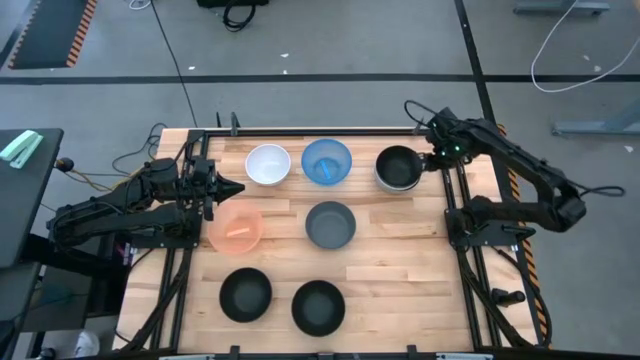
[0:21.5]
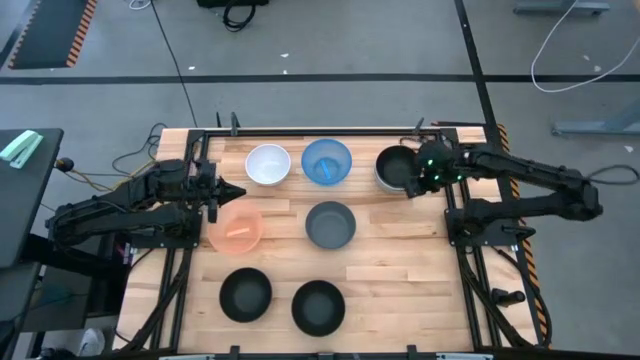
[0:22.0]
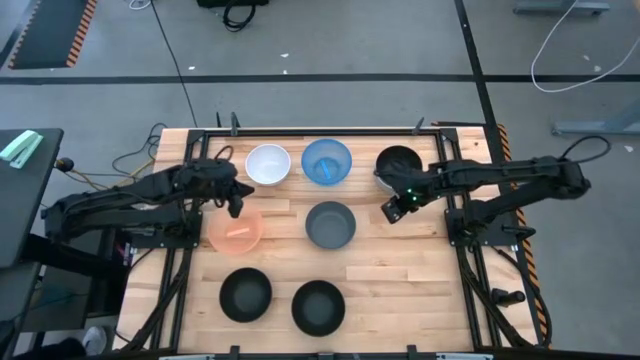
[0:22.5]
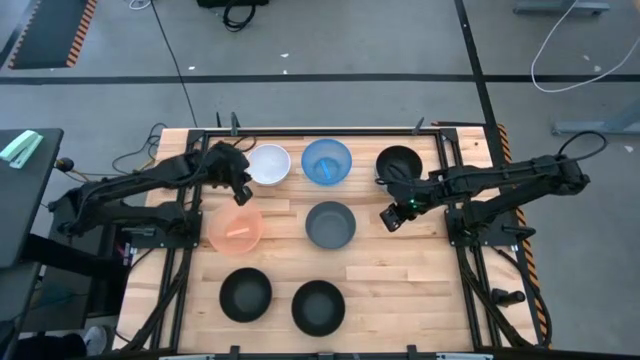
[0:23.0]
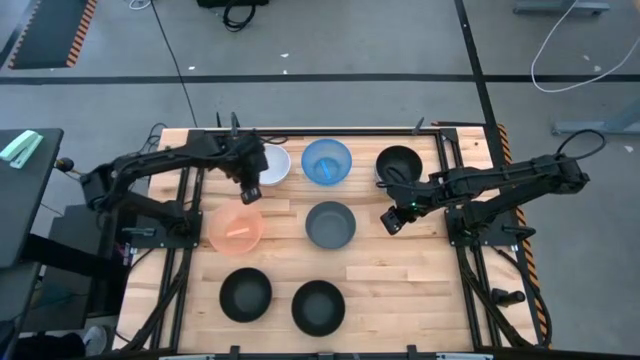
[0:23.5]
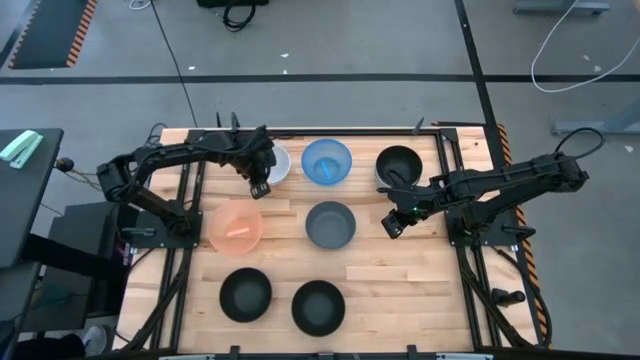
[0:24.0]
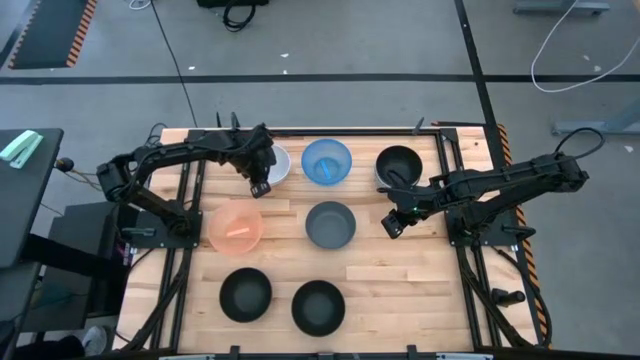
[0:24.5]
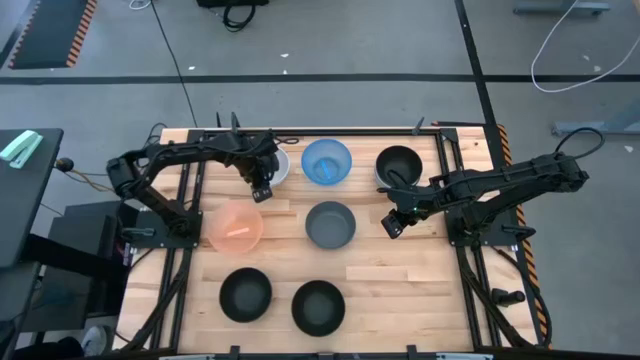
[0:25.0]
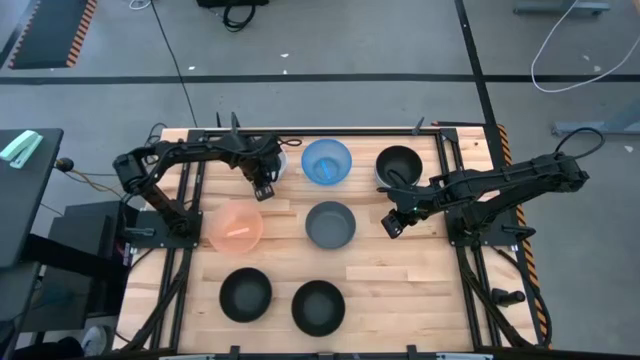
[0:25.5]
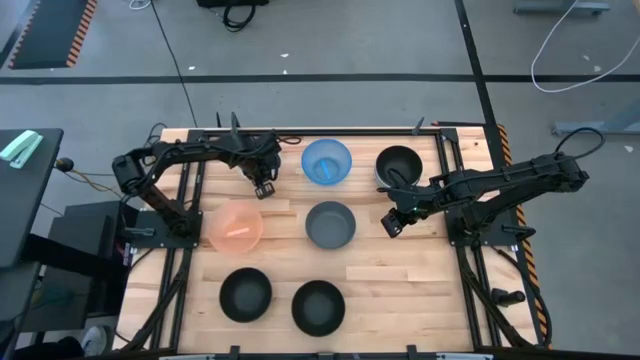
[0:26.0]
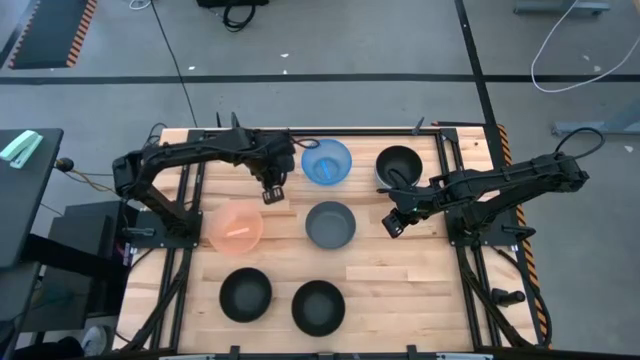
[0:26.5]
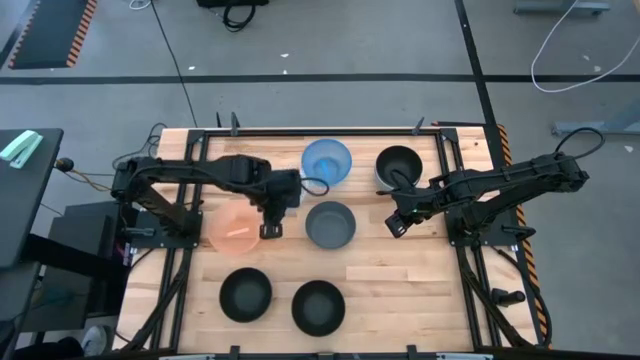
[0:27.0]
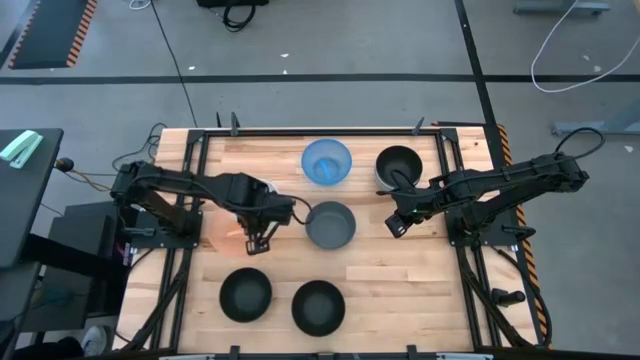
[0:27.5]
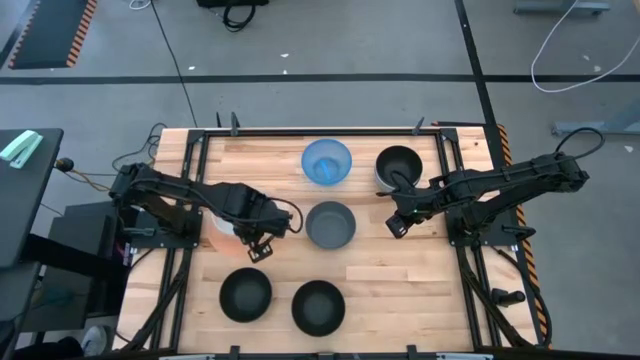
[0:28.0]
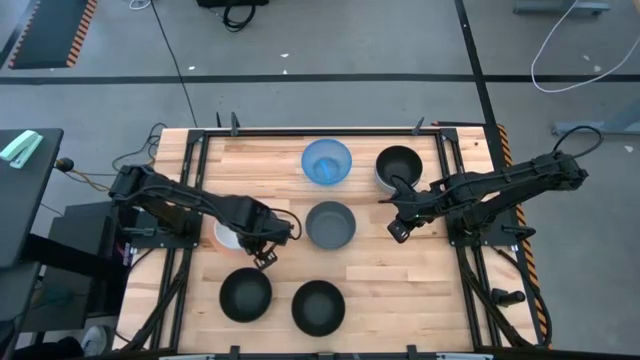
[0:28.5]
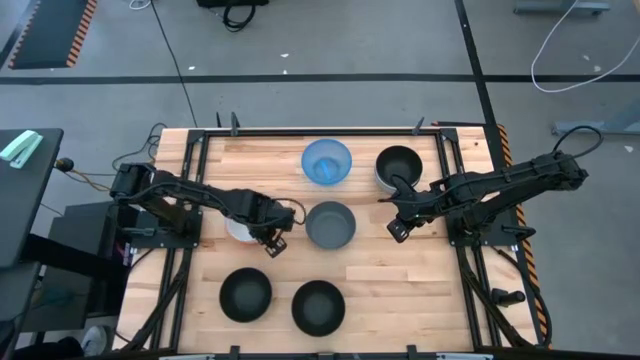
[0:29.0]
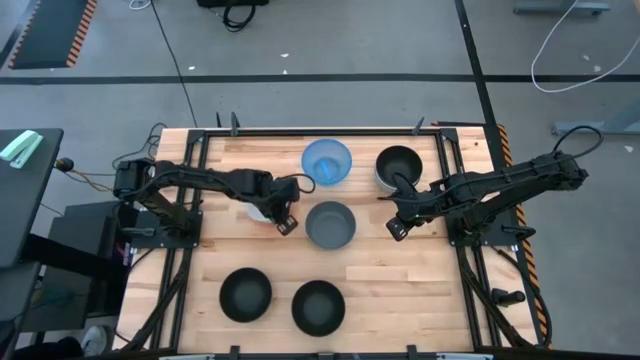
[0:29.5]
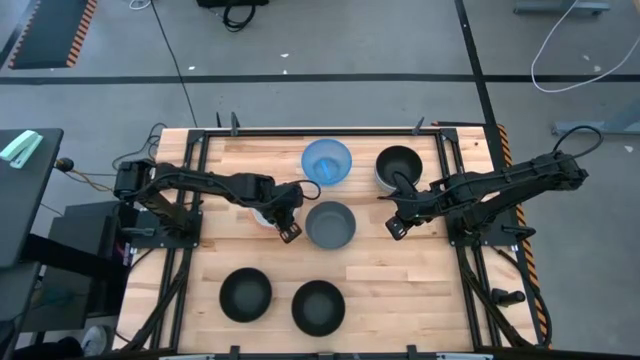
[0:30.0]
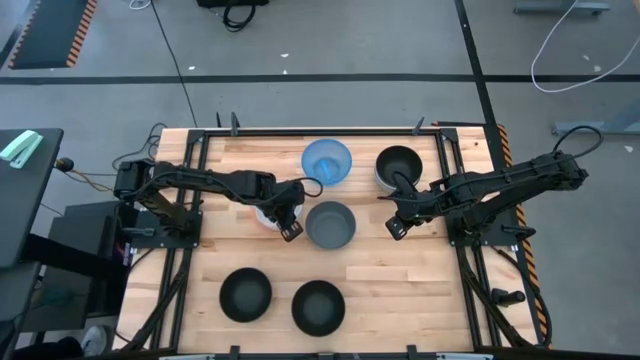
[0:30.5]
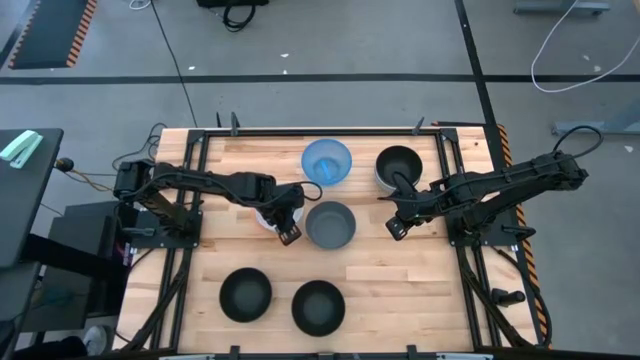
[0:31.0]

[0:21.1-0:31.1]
Task: Nest bowls inside each other
Stack the white bowl on top of the orange bowl

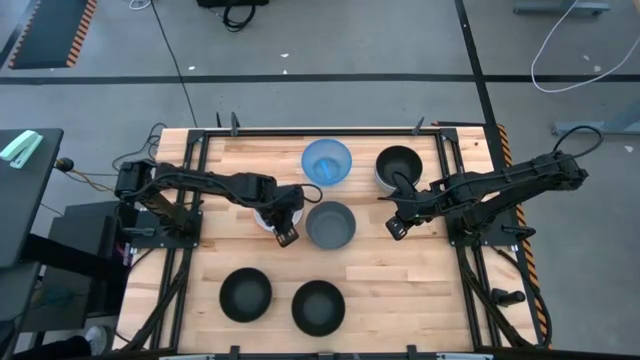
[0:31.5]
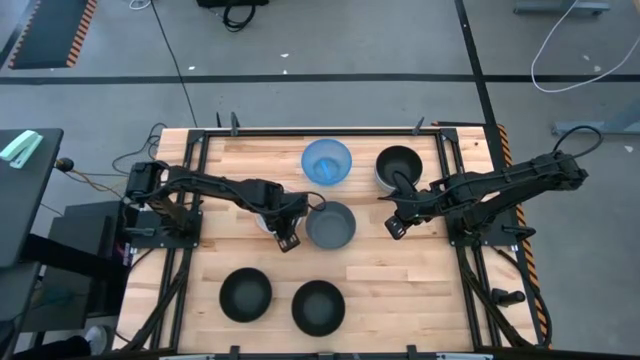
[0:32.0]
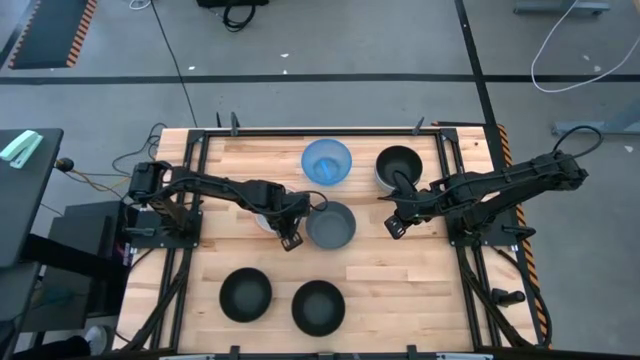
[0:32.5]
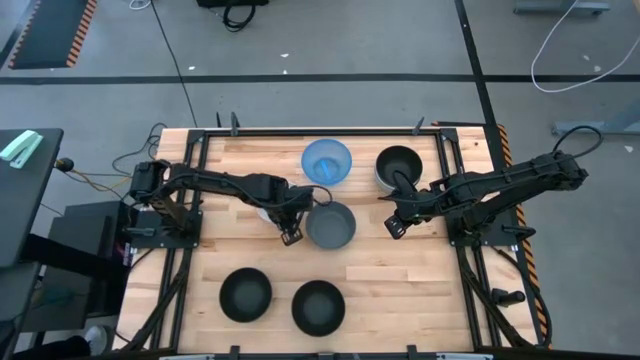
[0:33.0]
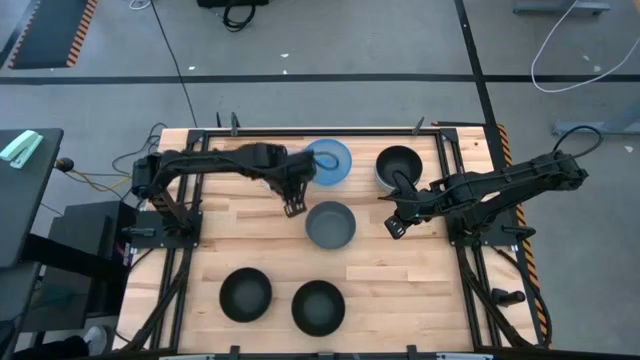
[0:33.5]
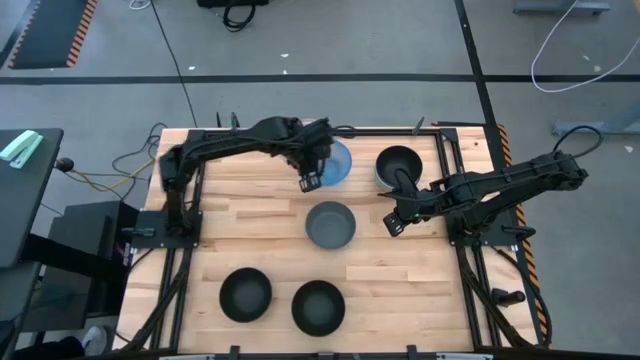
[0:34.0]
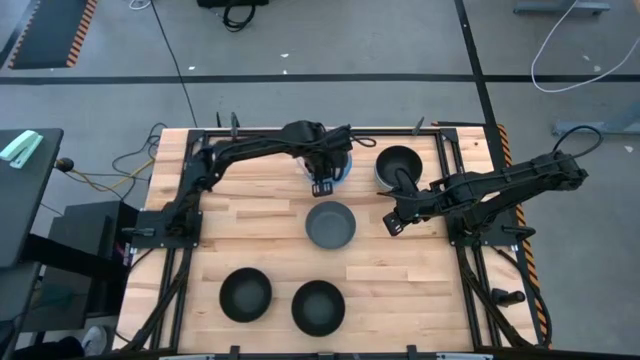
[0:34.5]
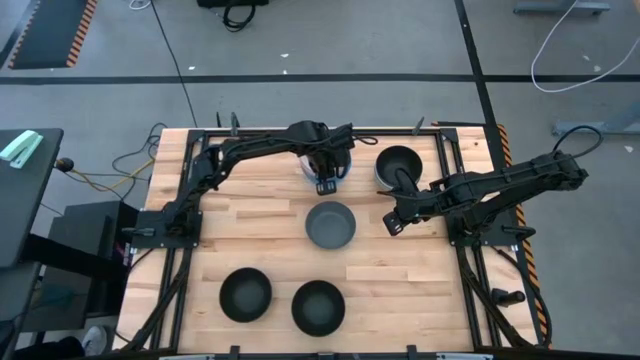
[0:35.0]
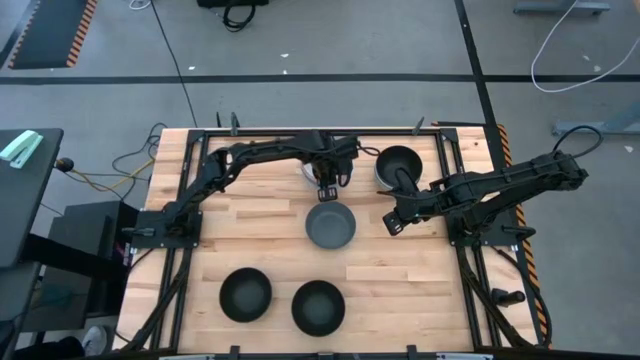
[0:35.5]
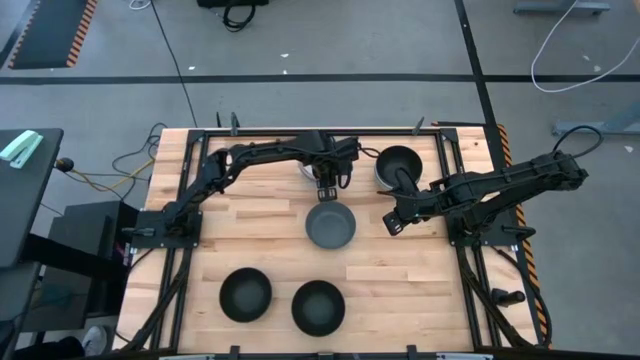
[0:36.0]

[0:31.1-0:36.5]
Stack the stacked bowls on top of the blue bowl

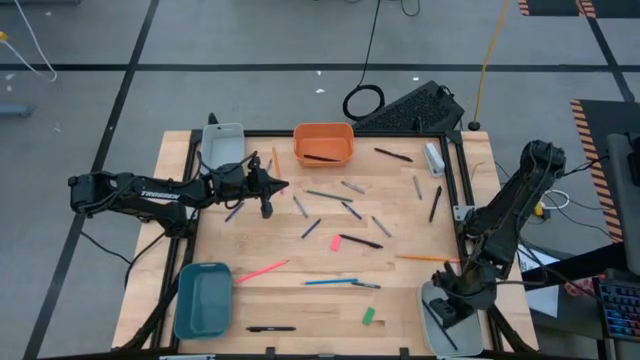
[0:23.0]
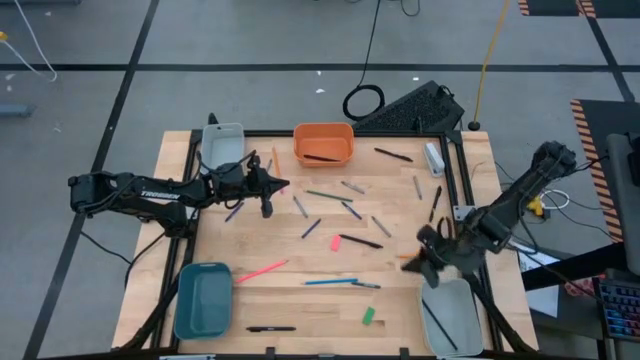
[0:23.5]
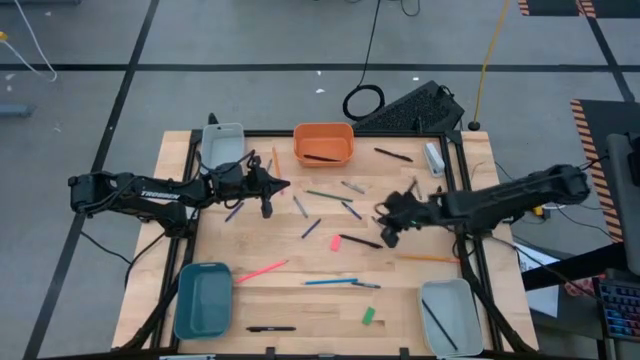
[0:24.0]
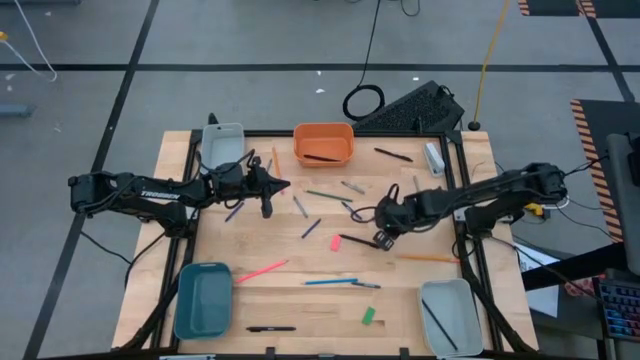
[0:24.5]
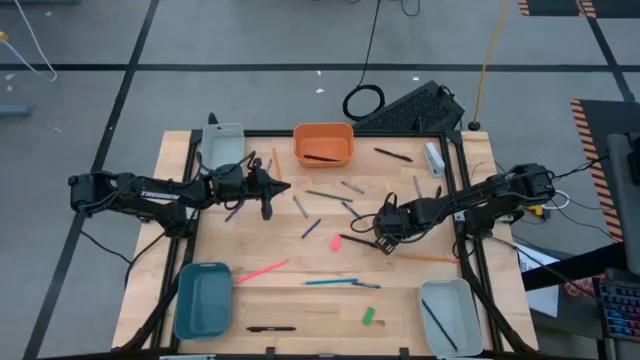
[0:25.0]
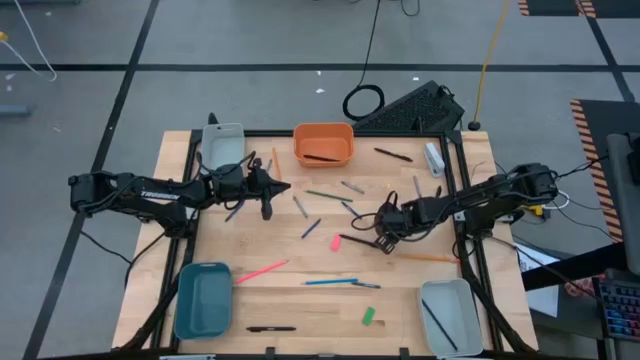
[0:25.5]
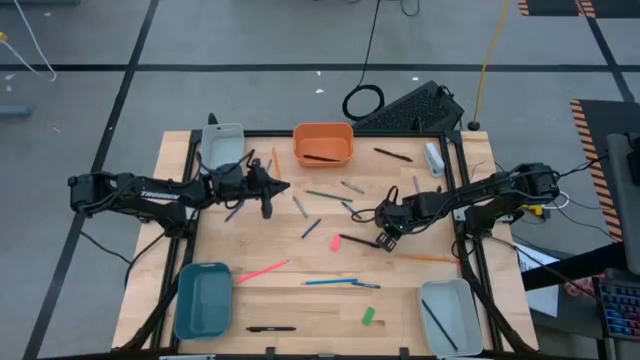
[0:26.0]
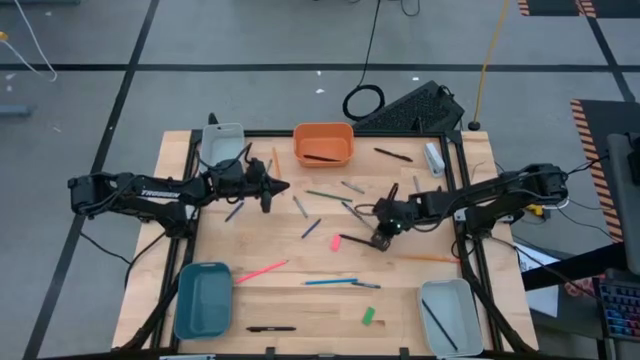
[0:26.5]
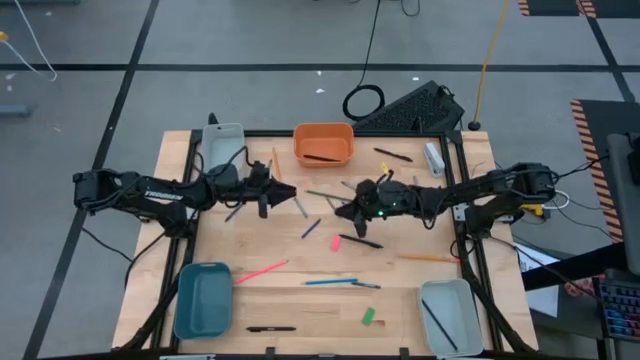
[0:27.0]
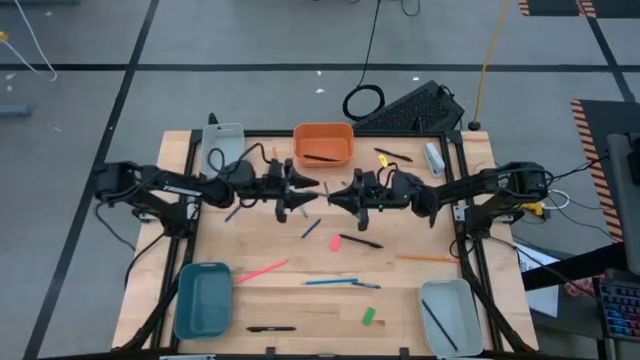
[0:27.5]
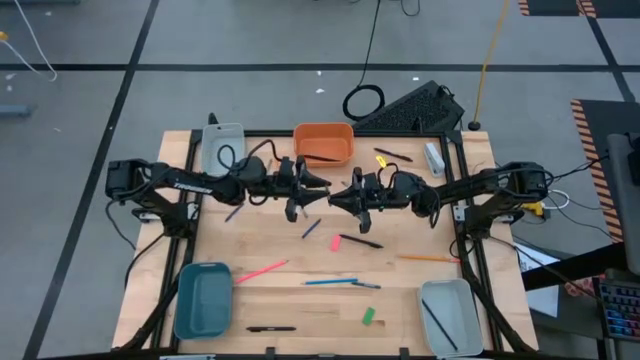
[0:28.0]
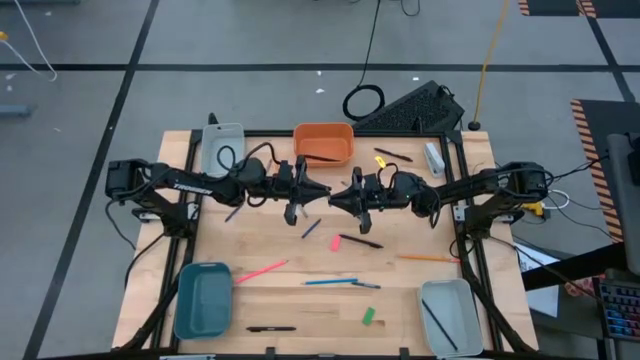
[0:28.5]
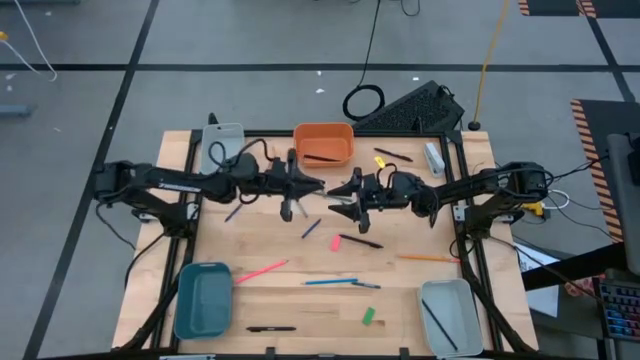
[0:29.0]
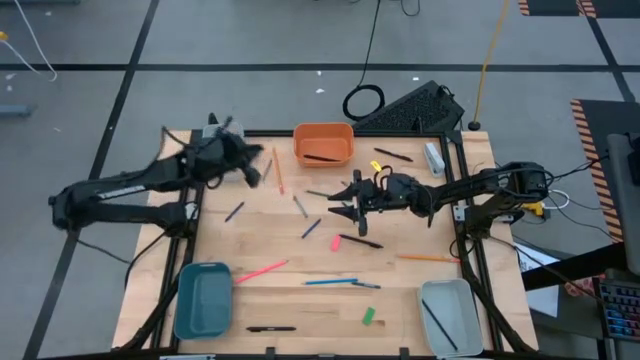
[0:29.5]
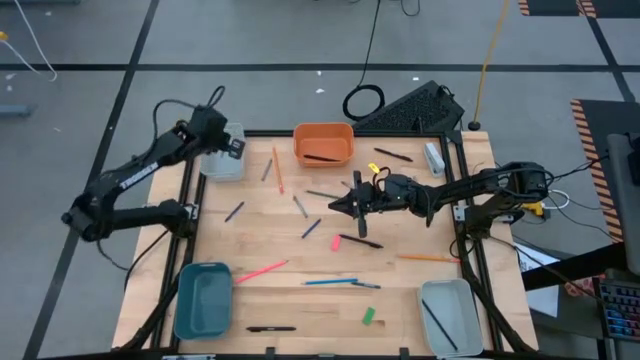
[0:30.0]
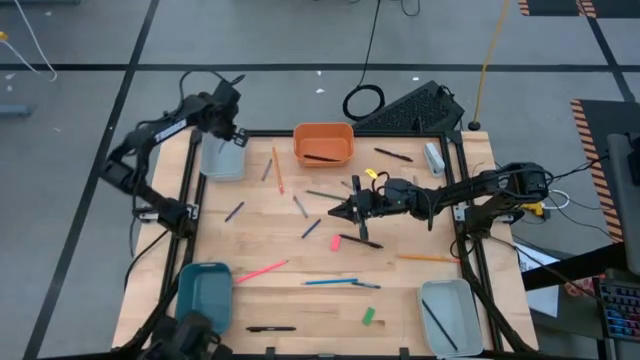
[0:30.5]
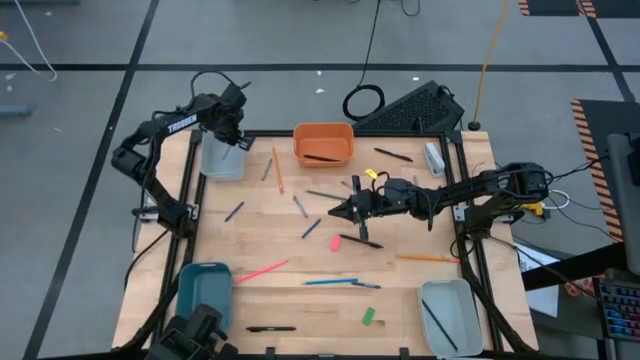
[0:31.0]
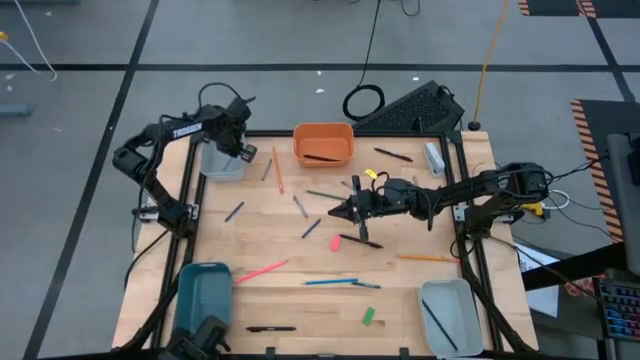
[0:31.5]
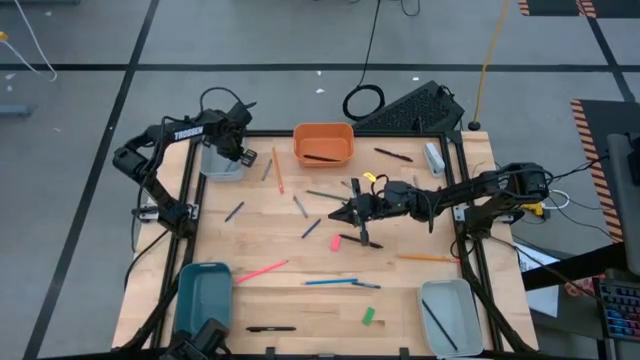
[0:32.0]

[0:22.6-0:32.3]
Task: Sort crayons/erasers/pens/pencils in bins
Put the gray crayon into the top gray bin
